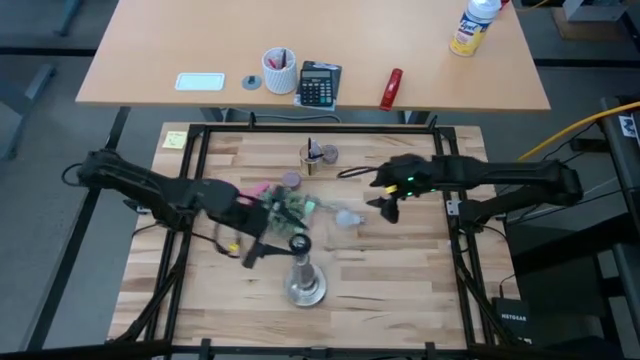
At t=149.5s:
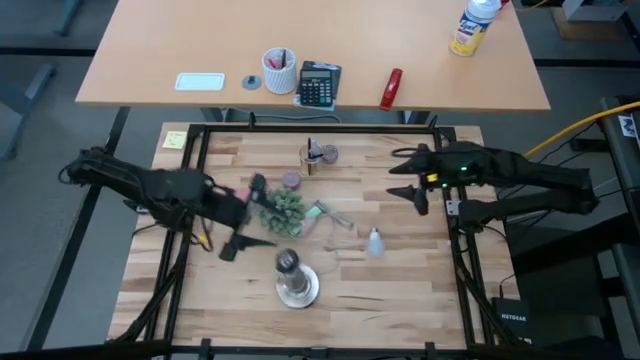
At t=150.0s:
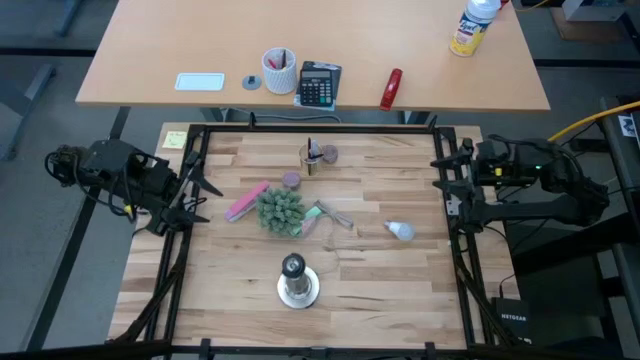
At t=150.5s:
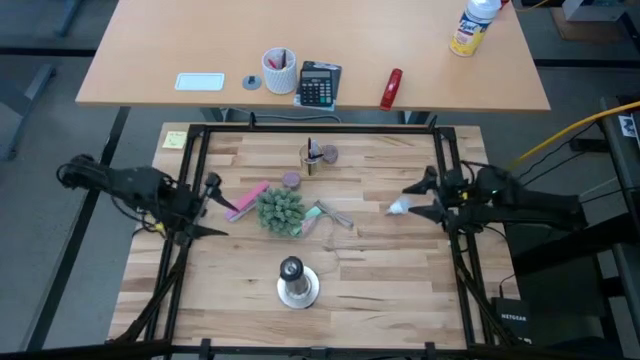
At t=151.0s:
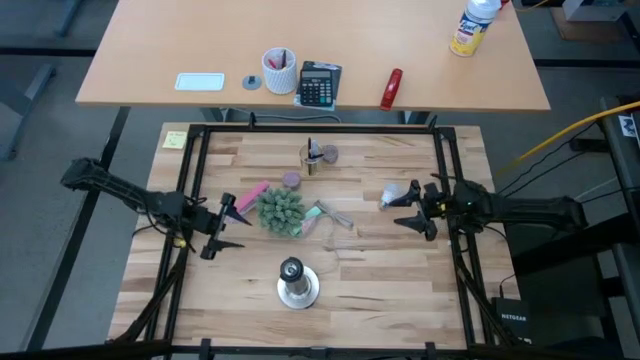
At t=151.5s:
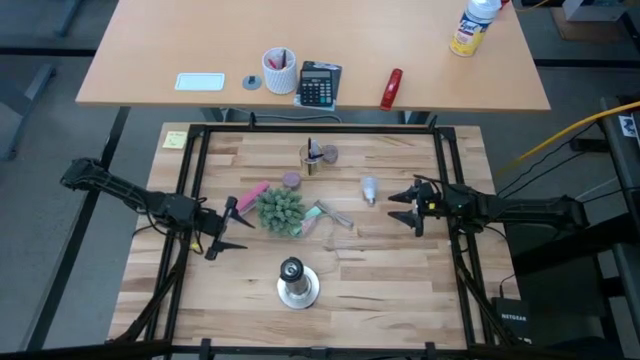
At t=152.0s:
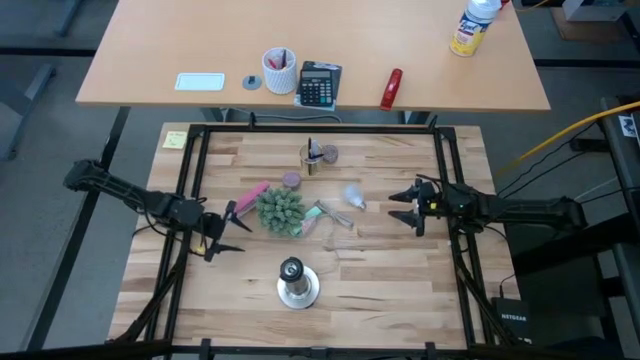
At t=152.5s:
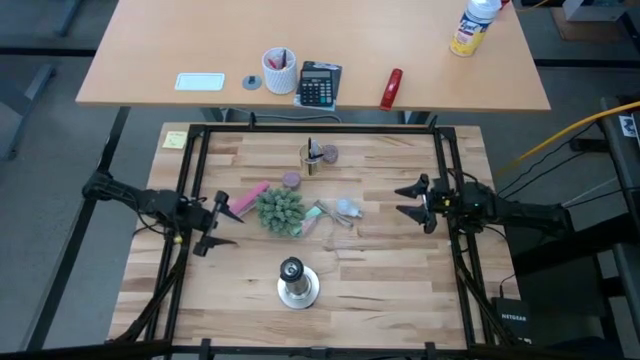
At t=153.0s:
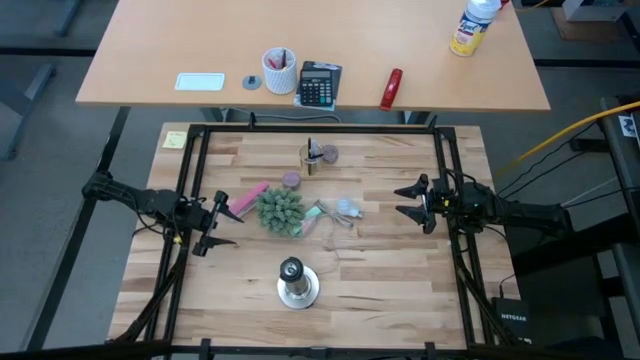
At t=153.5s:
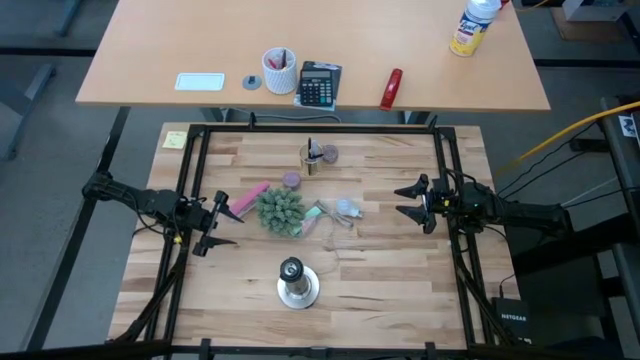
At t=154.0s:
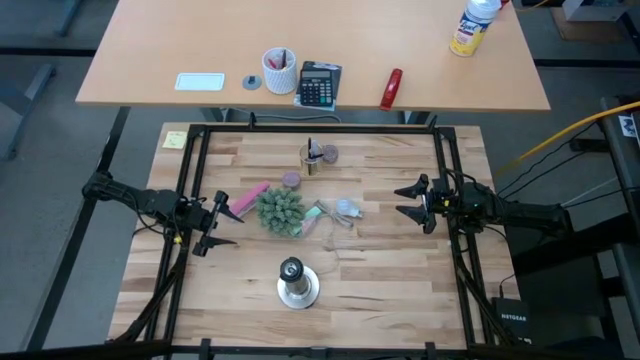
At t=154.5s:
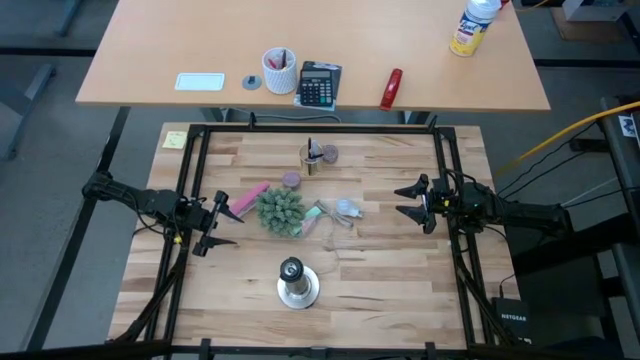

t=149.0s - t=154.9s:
Task: Screw lightbulb
Return to Home Position

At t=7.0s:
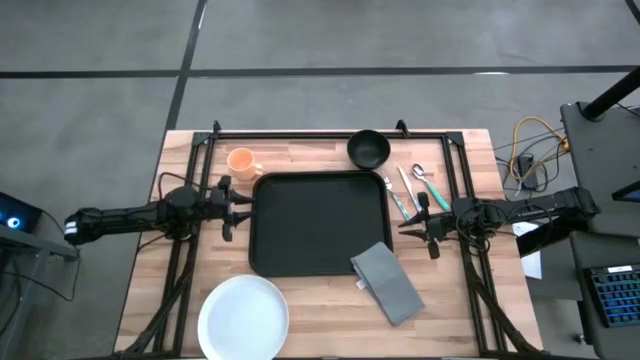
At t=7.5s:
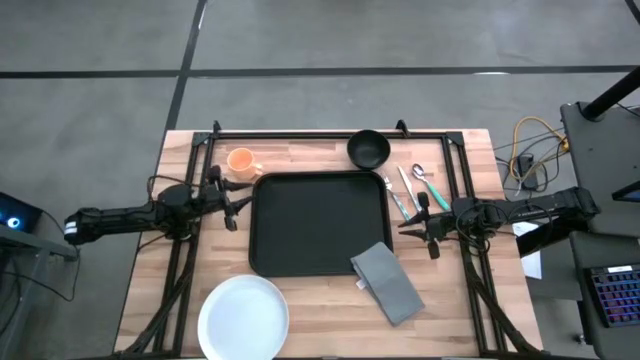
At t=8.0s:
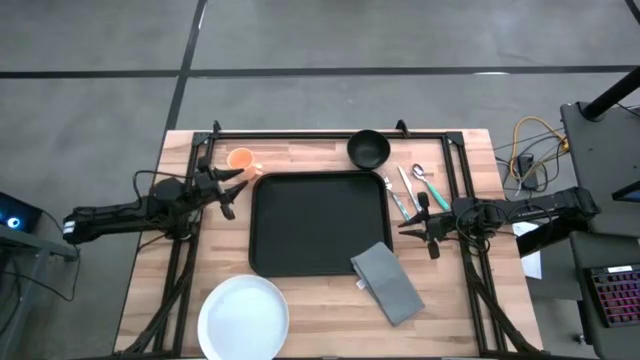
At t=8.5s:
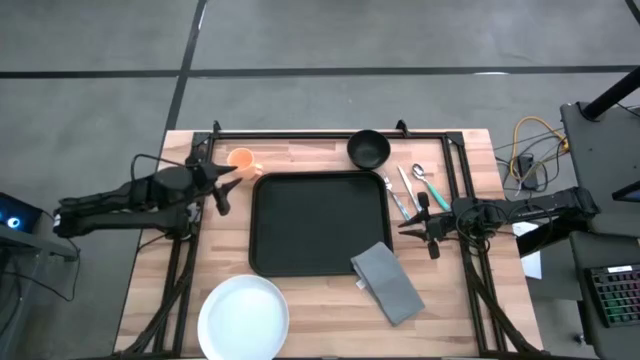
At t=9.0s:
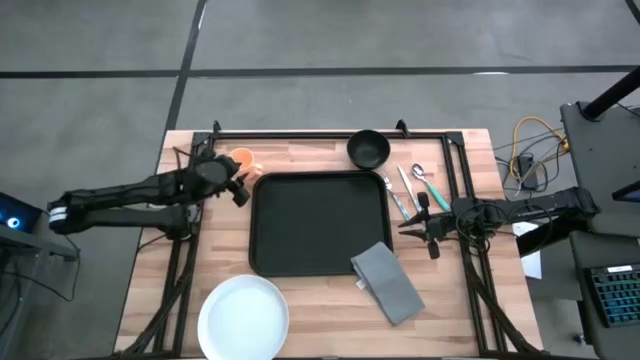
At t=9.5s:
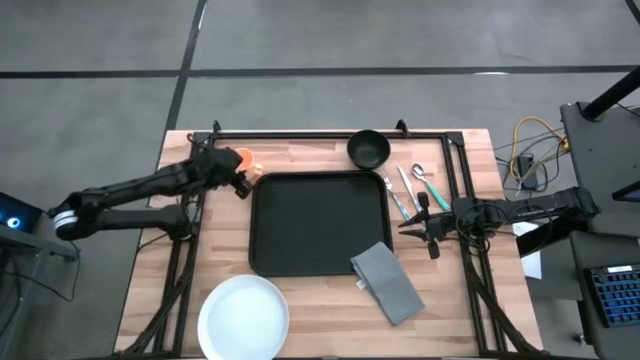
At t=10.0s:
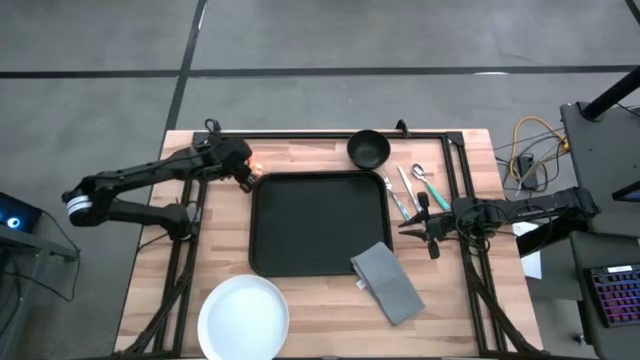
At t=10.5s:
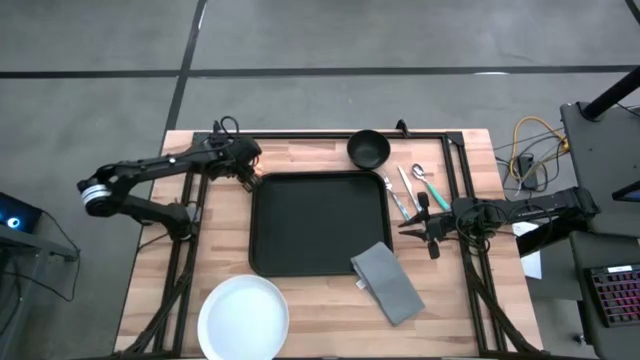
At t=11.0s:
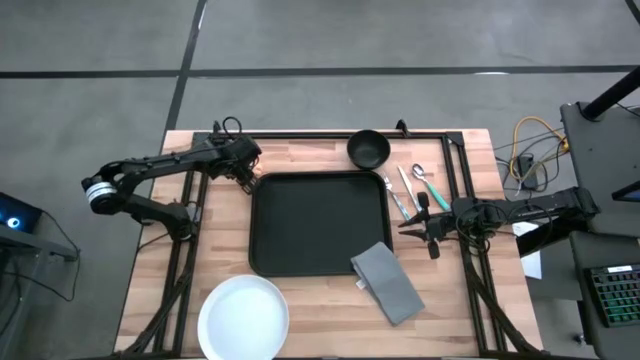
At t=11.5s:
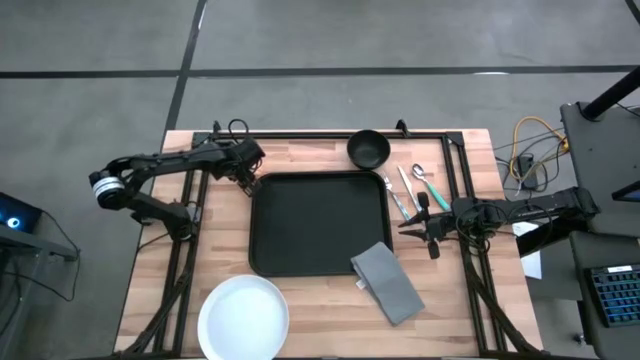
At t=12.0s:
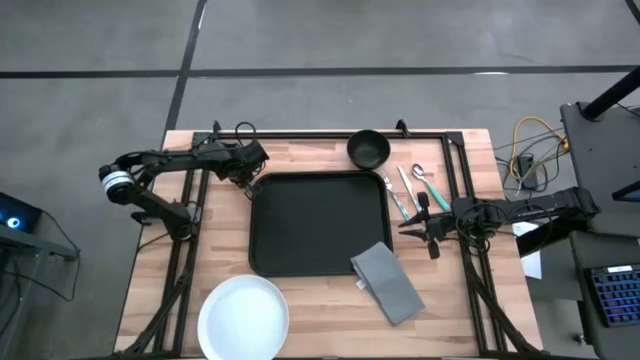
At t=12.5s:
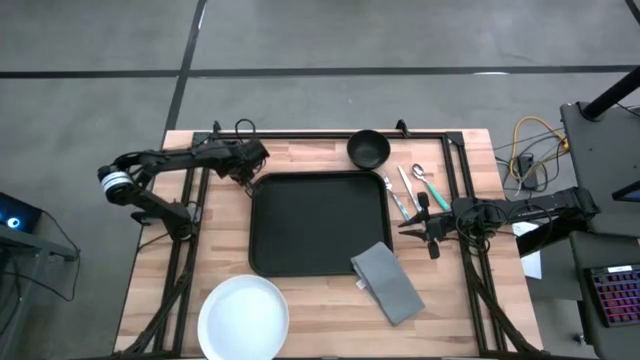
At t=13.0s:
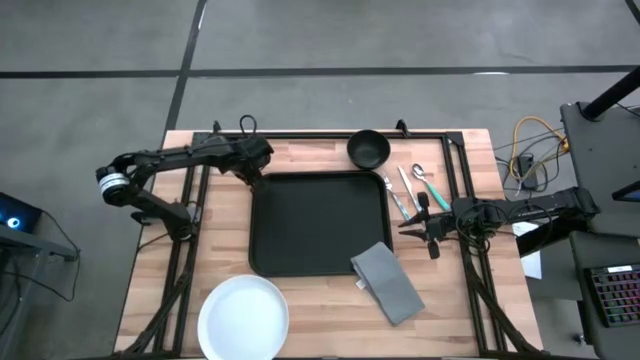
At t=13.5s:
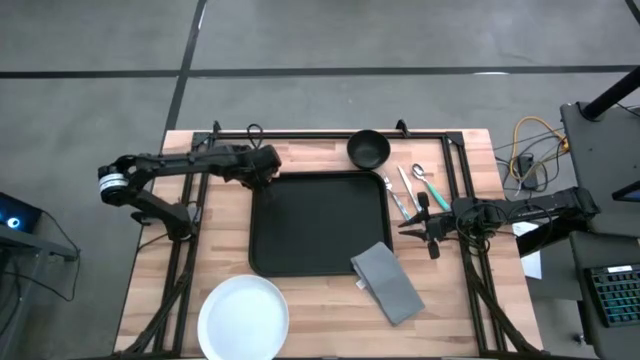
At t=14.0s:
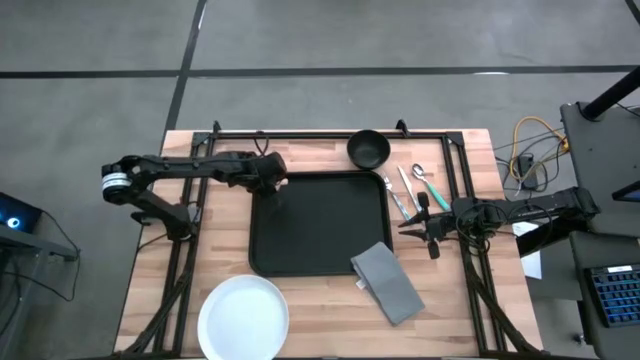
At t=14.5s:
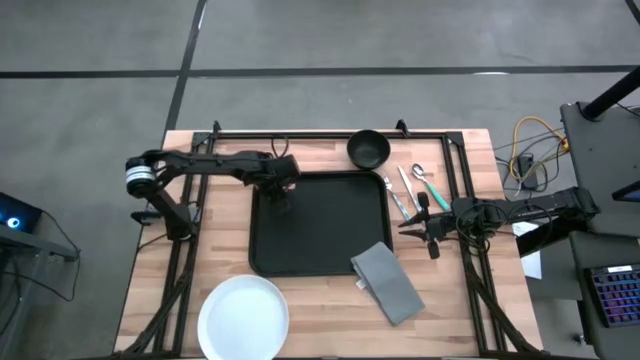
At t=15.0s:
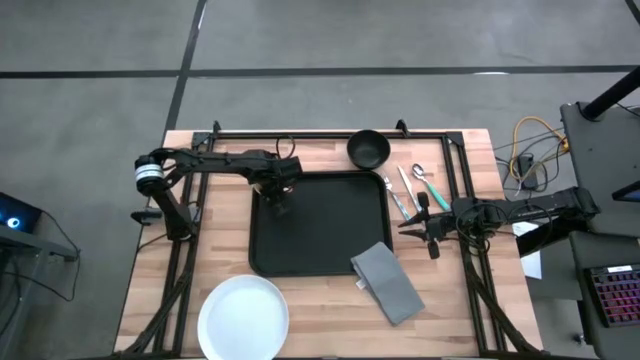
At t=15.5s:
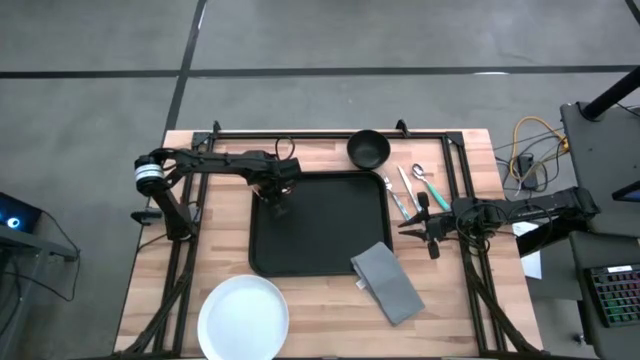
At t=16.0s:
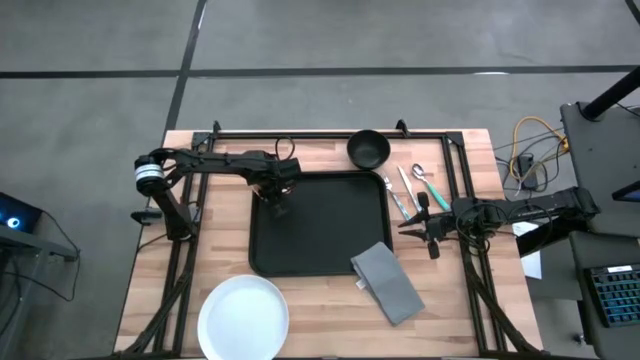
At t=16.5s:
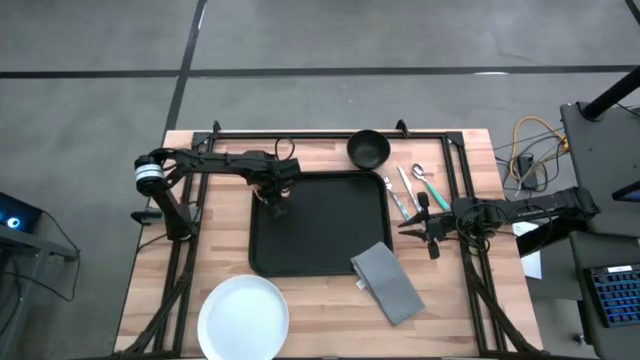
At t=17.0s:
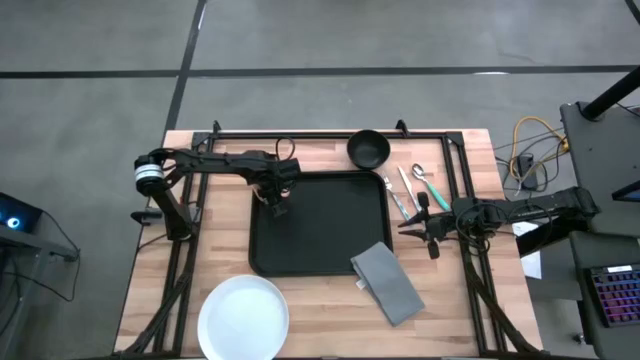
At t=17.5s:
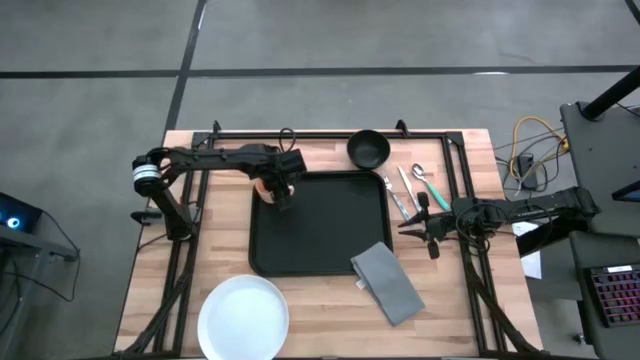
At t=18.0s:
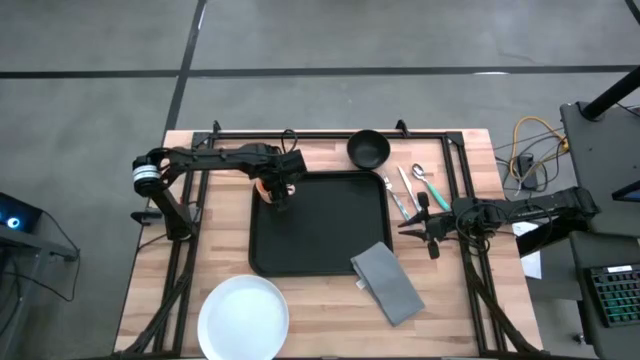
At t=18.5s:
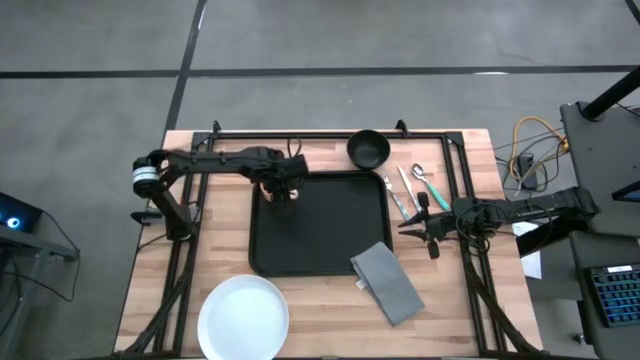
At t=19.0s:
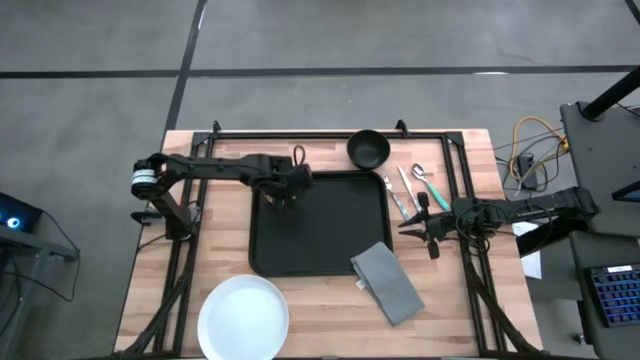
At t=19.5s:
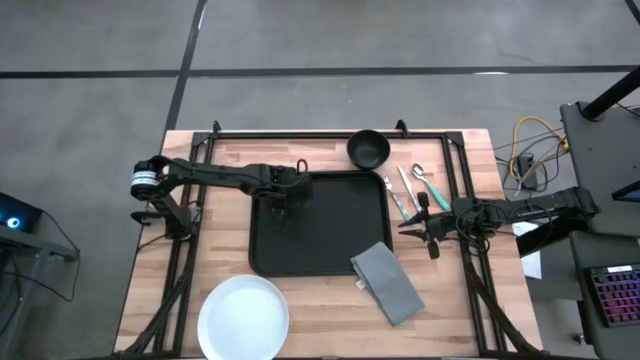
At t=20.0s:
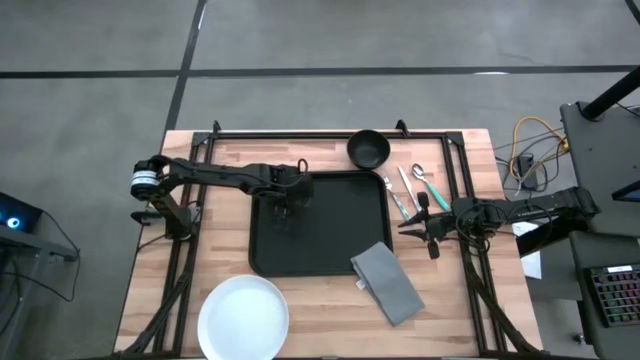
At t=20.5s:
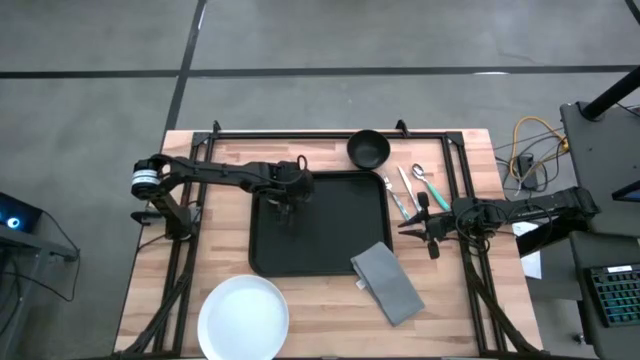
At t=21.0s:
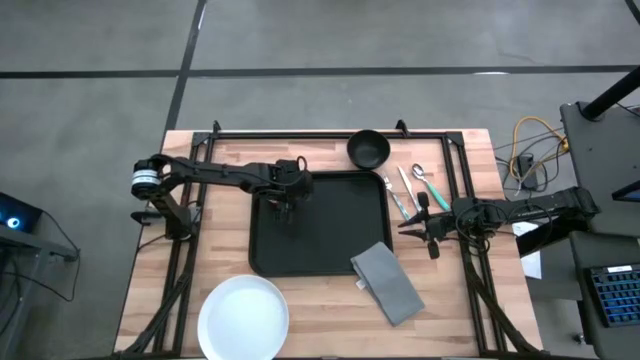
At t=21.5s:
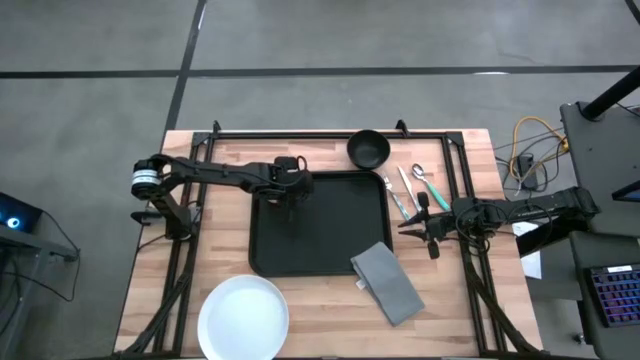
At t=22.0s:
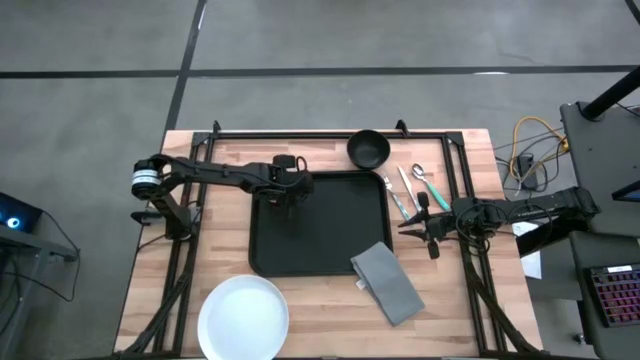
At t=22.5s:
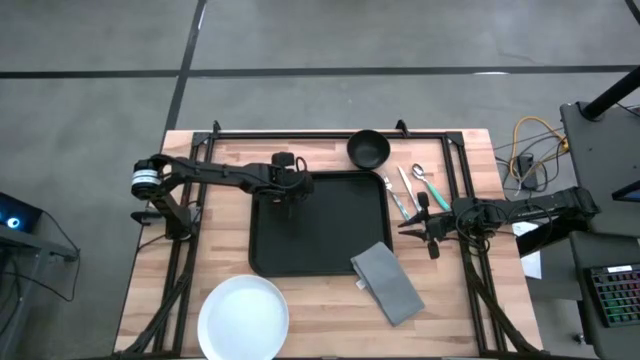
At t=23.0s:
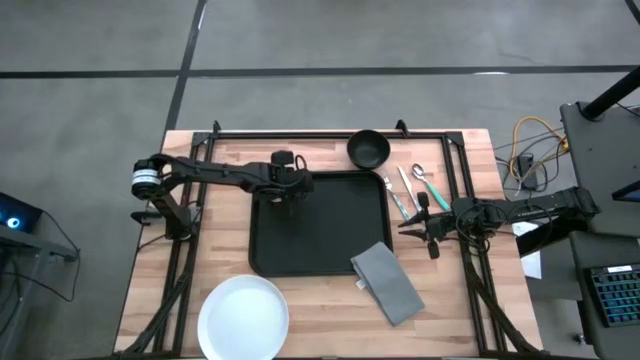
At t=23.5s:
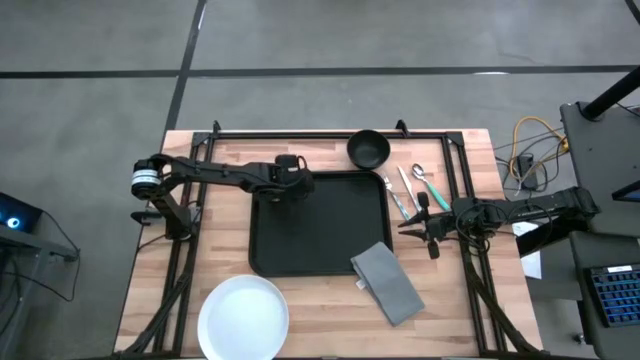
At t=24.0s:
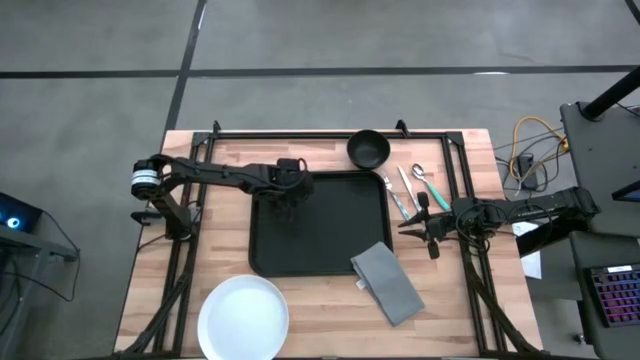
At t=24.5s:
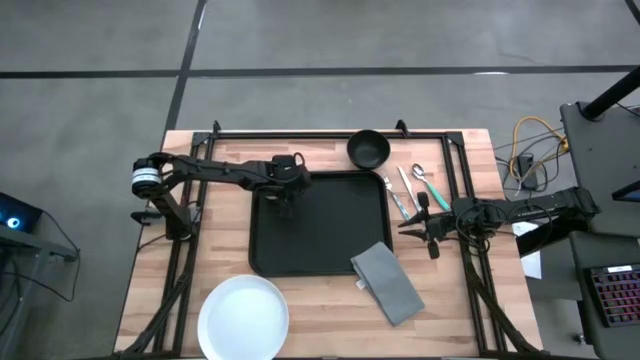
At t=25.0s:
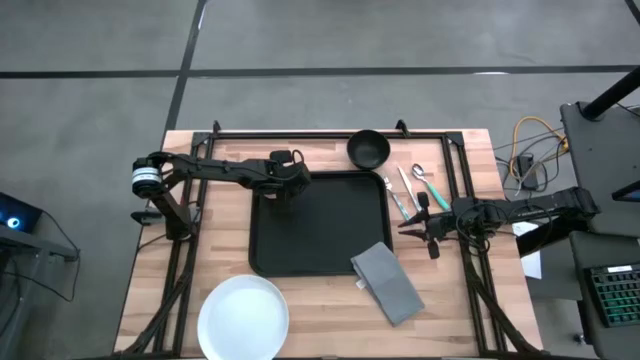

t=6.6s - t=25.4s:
Task: Set up tray
Put the yellow mug on the black serving tray
